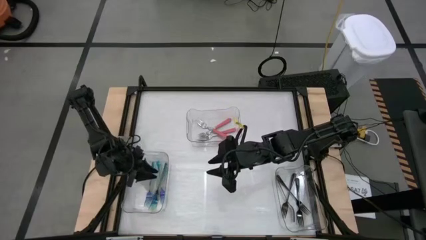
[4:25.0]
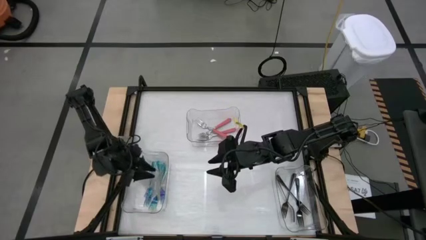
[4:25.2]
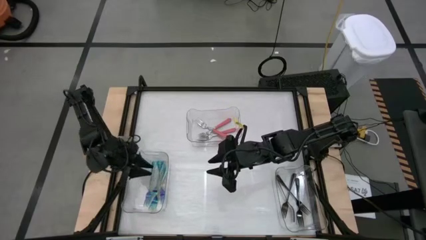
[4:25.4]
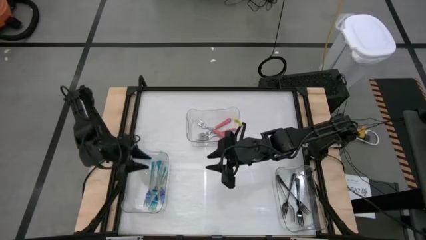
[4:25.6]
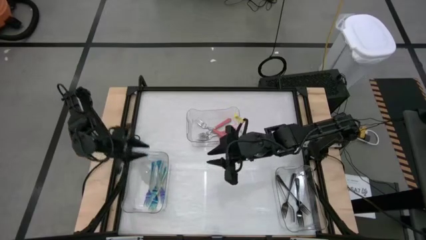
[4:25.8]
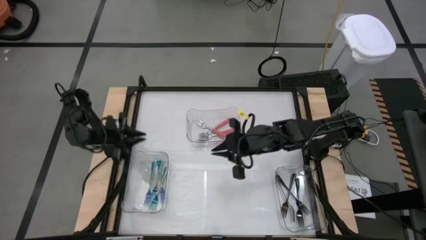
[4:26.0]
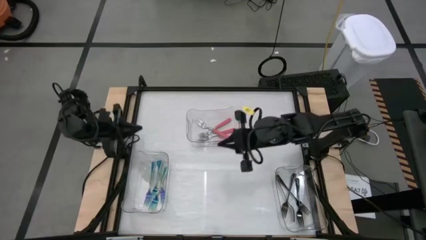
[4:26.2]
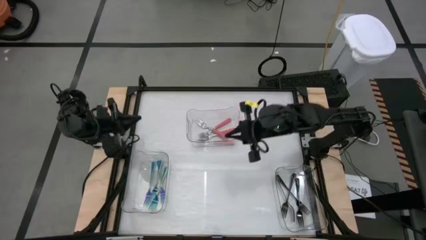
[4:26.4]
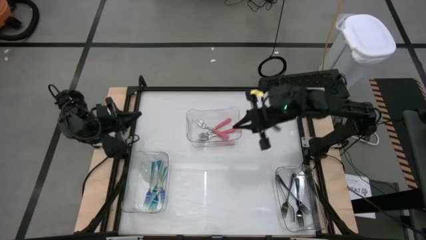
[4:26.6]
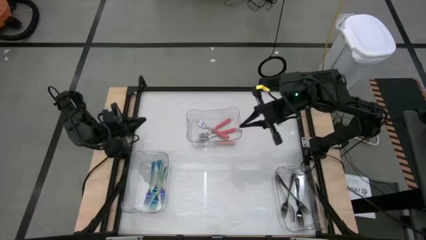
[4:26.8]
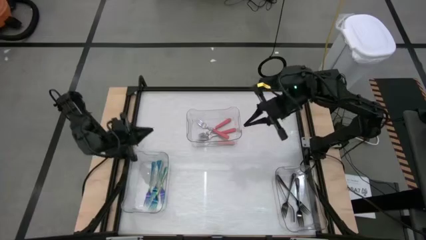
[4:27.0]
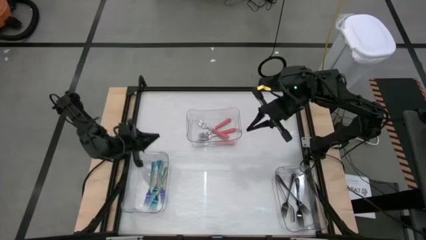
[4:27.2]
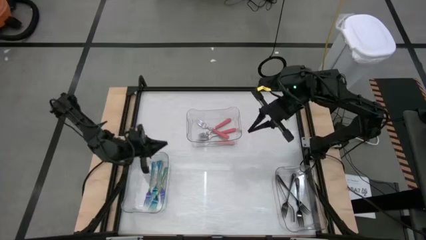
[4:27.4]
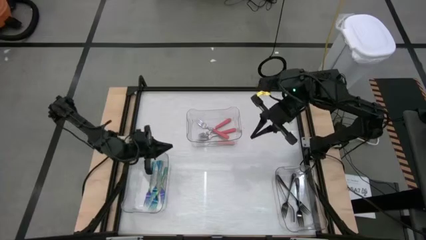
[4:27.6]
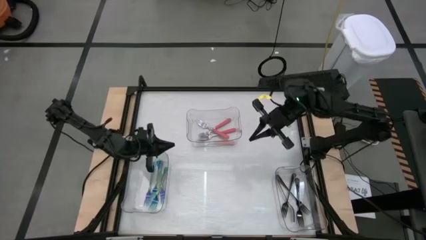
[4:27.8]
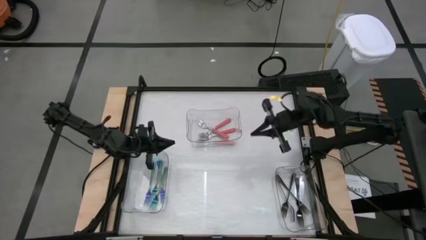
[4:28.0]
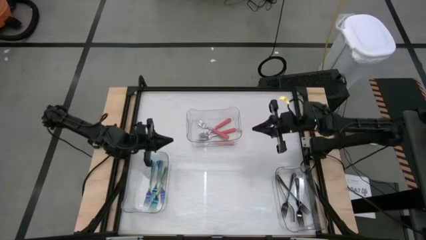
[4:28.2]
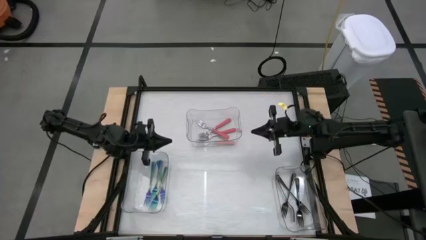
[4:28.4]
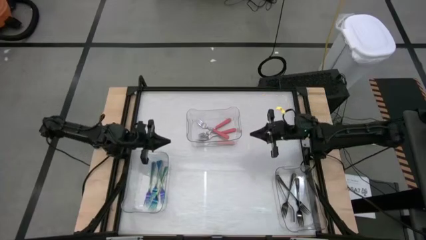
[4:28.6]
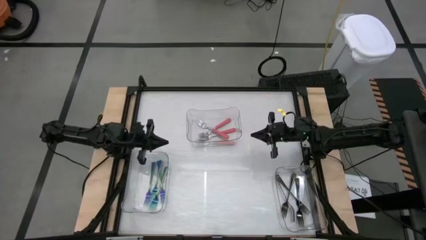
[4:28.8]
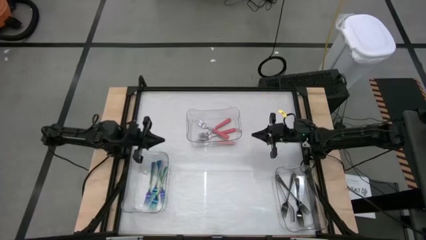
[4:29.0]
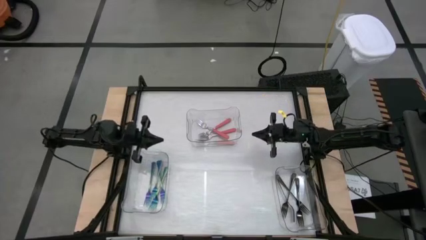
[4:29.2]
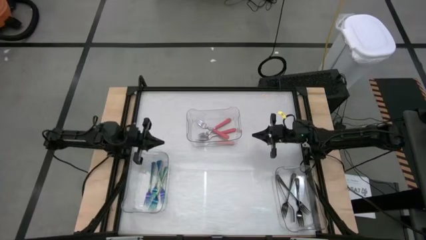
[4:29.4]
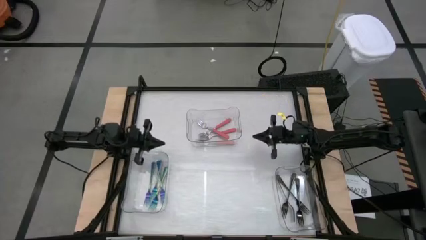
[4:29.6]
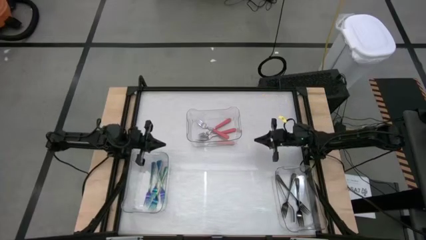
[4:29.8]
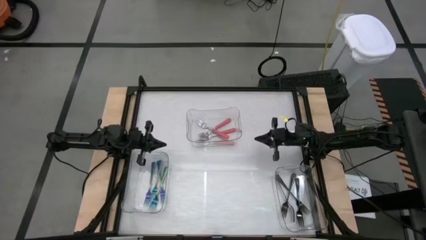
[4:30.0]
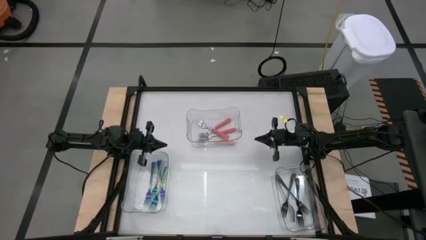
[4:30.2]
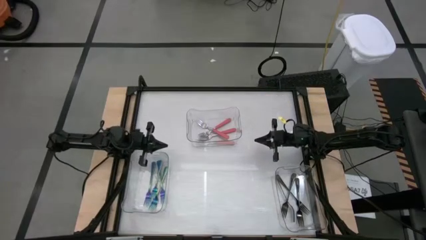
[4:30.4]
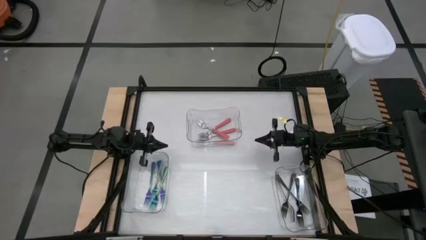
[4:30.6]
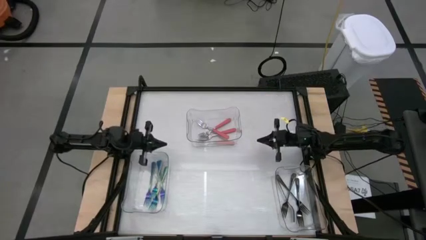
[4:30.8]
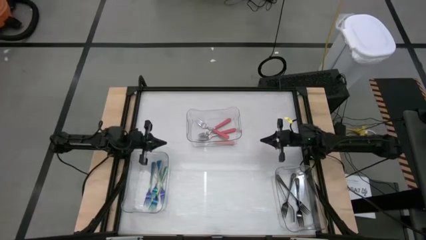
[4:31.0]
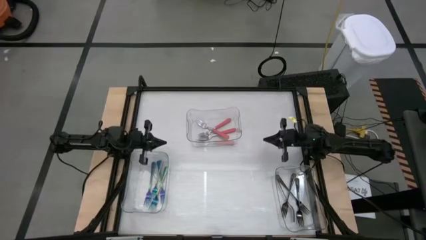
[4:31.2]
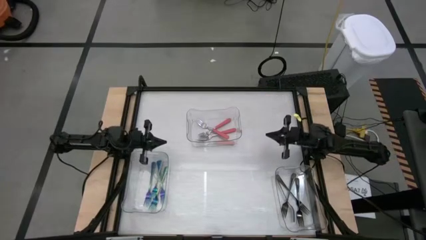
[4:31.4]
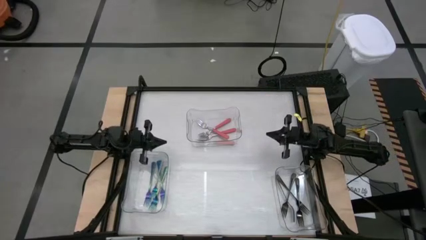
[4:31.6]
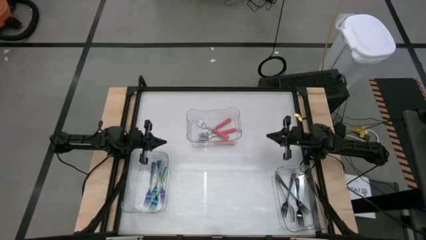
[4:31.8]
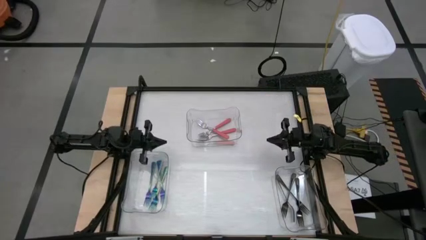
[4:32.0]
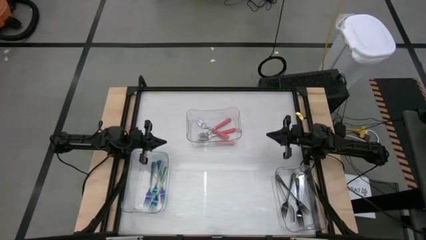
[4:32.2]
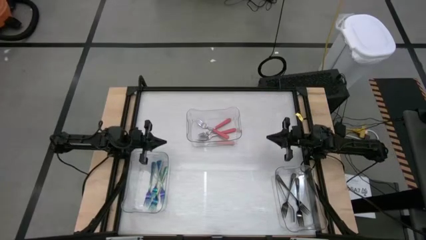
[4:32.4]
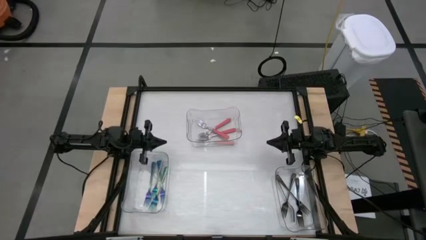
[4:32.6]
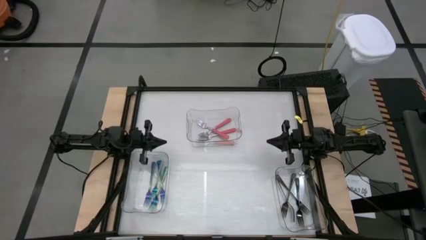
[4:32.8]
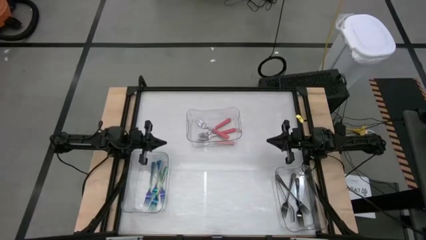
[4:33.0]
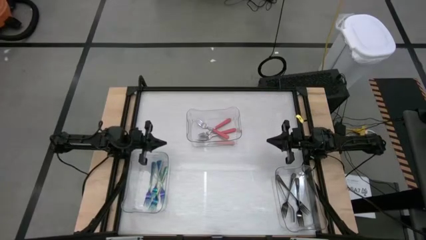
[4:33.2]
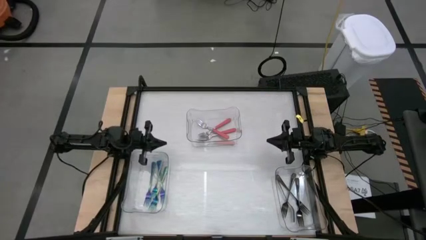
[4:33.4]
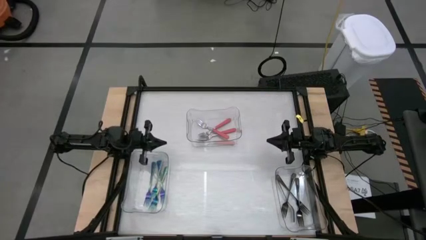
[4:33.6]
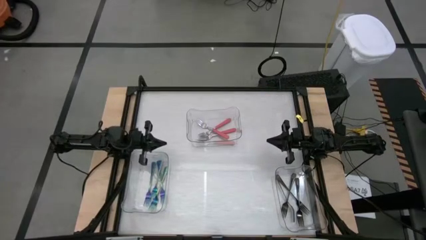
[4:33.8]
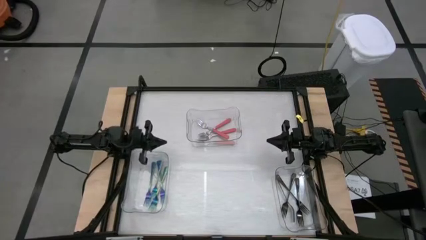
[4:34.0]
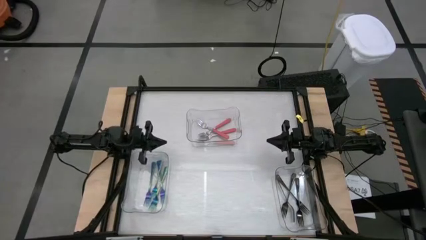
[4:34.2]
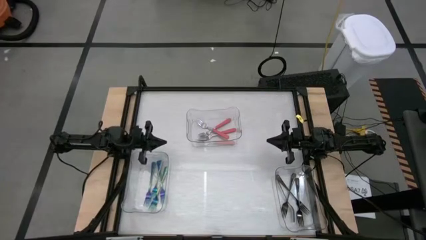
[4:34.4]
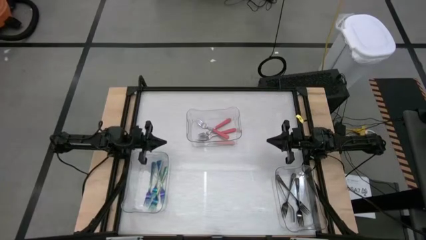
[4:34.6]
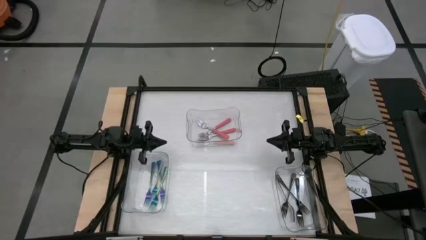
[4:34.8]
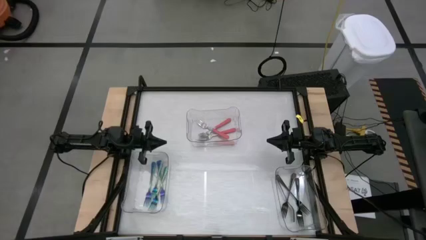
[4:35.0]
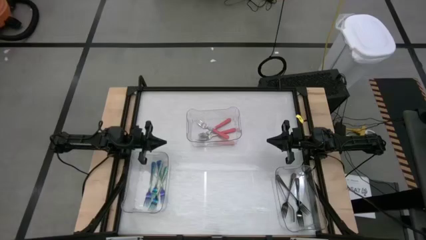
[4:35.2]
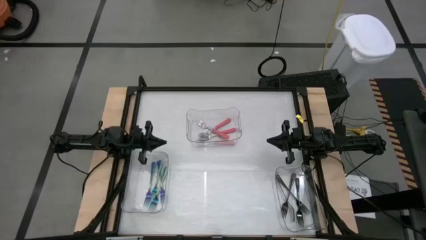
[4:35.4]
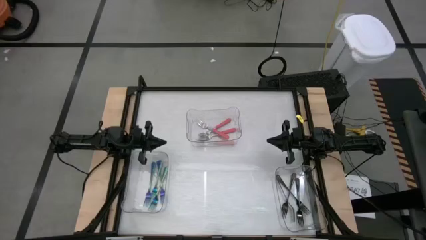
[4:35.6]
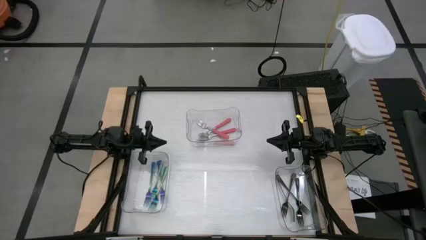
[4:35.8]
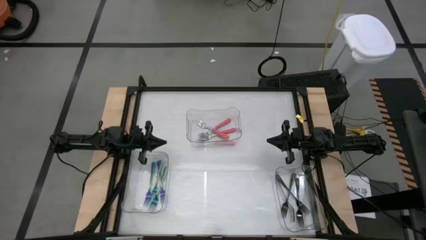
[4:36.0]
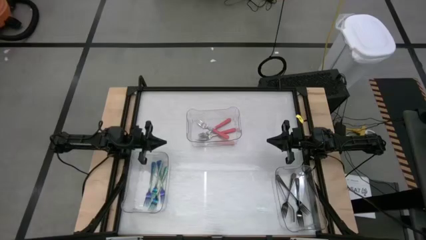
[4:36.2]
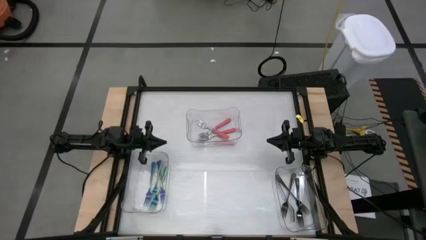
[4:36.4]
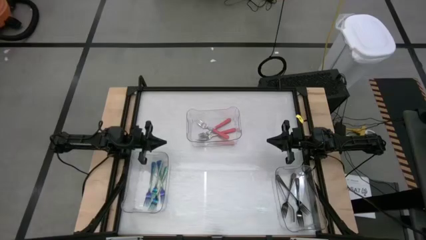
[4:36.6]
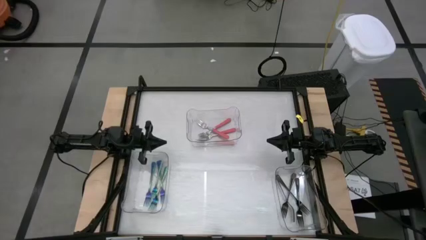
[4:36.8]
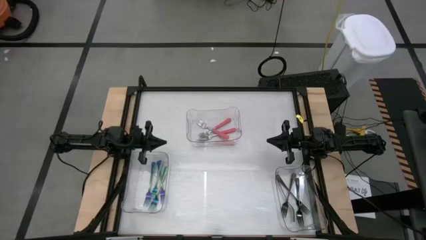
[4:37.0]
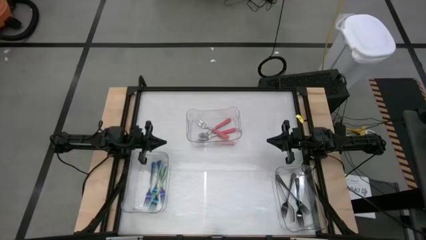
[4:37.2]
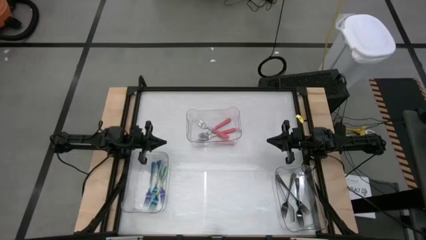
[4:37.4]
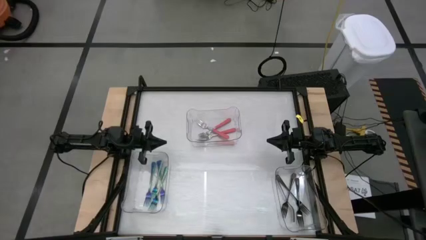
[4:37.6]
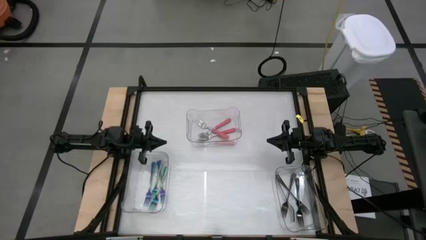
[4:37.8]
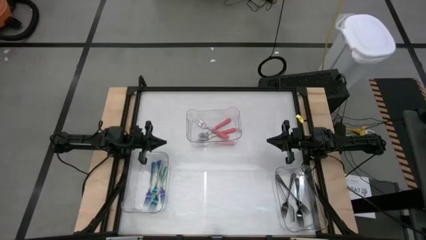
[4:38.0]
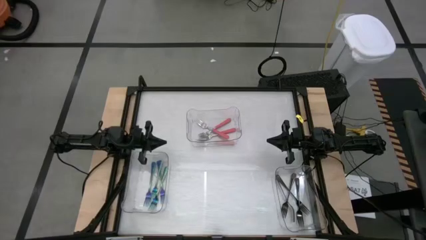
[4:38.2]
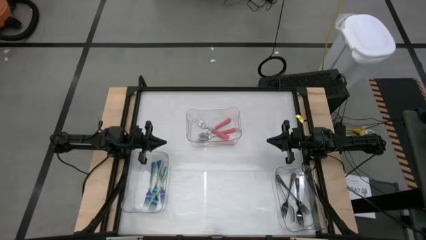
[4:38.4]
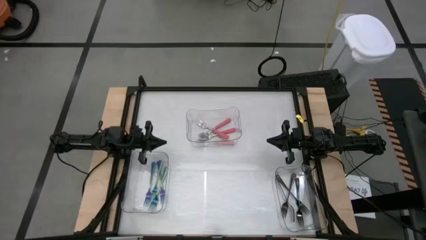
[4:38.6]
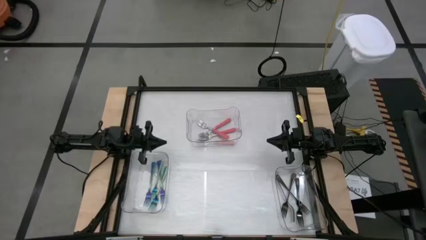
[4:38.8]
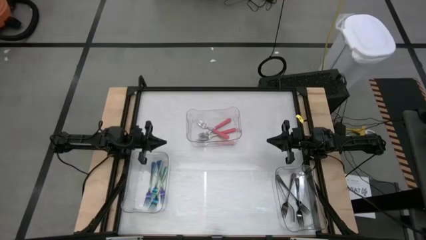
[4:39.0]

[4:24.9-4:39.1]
Task: Sort silverware by color (type)
Return to Home Position
